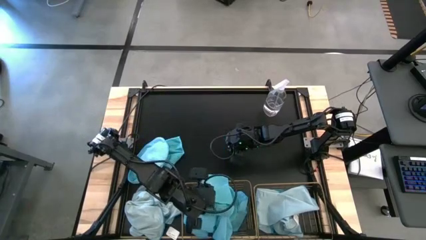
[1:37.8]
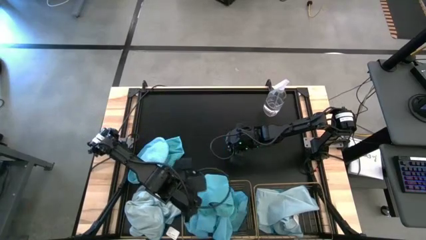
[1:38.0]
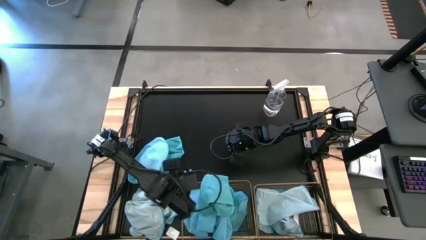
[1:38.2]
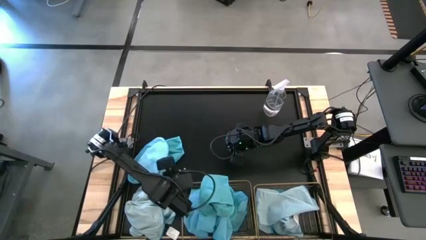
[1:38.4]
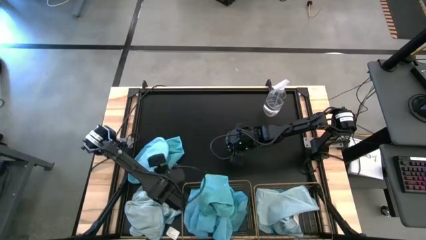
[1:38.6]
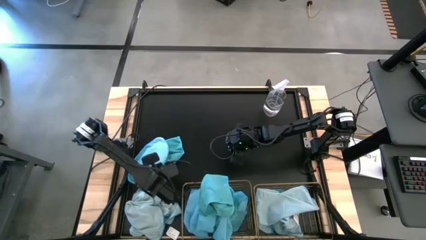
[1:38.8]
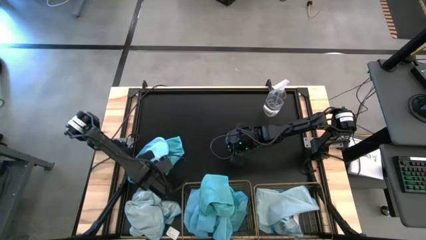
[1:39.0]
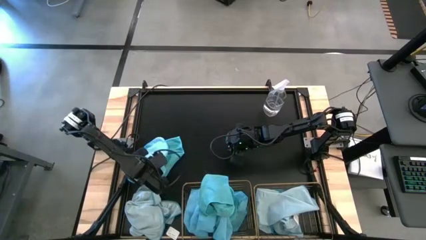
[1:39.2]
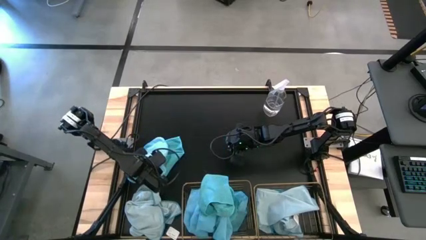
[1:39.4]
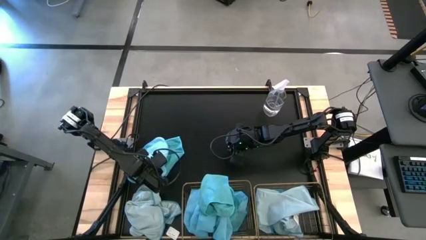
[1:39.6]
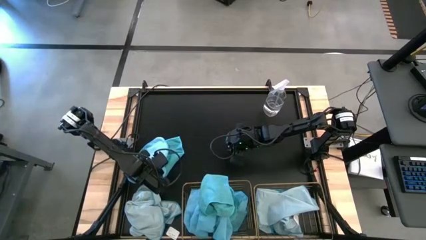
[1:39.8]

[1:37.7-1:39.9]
Task: Sort microfiber towel by color & place in baskets
Put the blue towel into the left wire basket

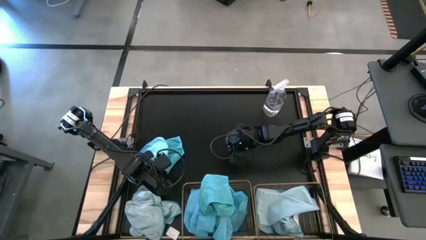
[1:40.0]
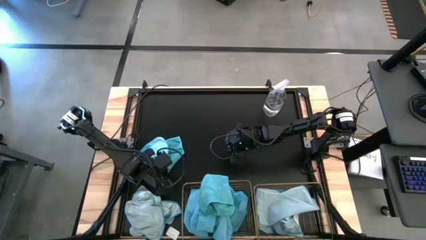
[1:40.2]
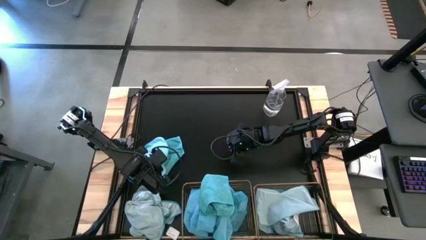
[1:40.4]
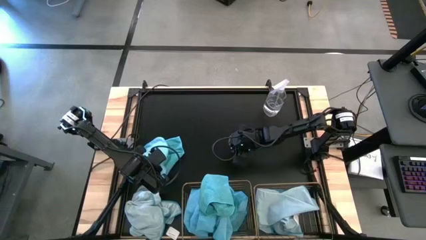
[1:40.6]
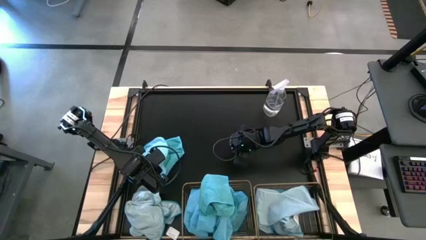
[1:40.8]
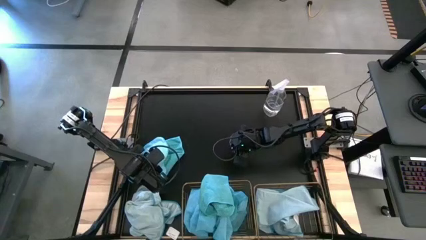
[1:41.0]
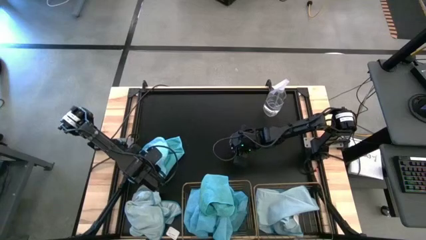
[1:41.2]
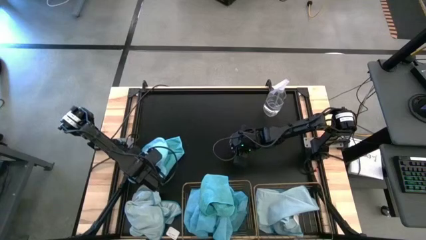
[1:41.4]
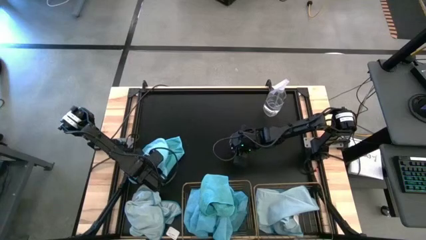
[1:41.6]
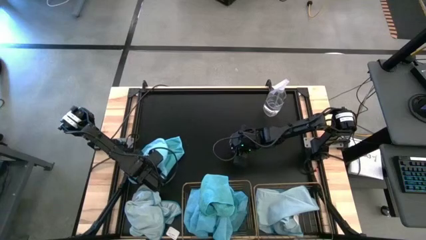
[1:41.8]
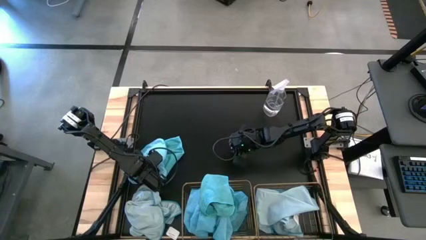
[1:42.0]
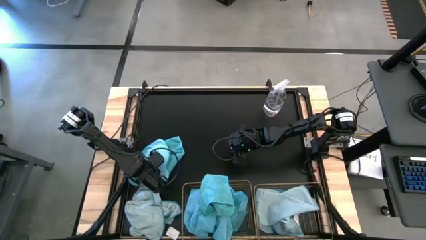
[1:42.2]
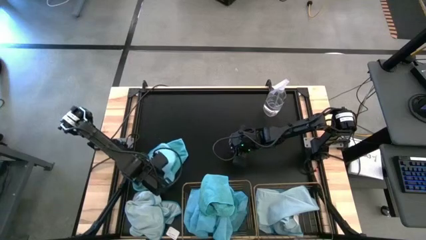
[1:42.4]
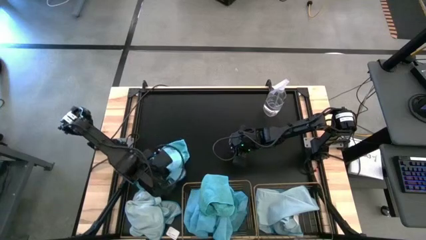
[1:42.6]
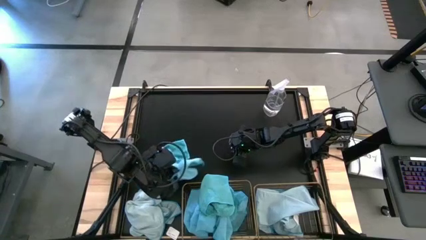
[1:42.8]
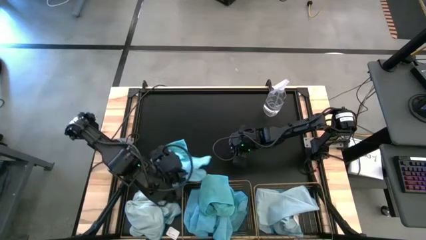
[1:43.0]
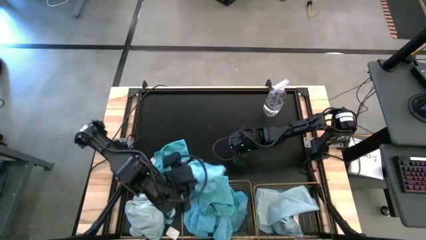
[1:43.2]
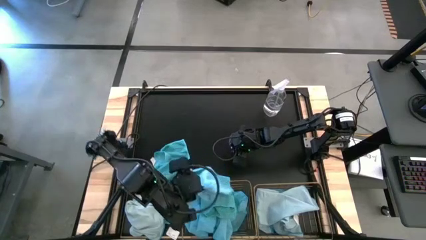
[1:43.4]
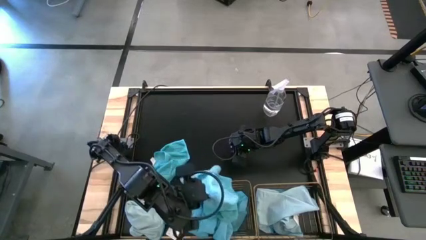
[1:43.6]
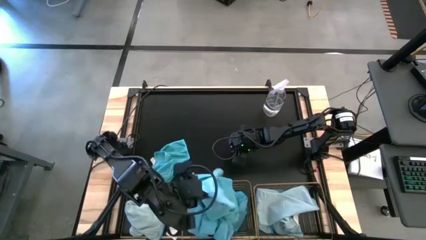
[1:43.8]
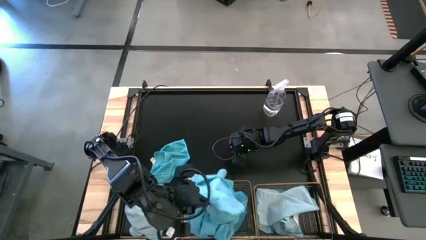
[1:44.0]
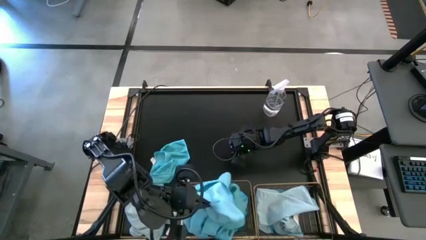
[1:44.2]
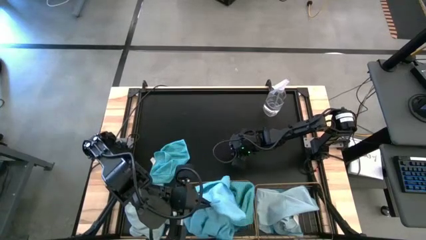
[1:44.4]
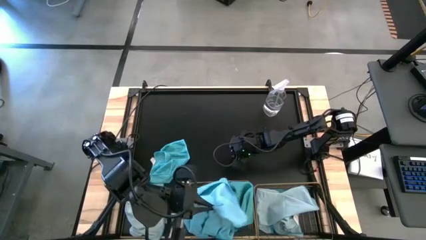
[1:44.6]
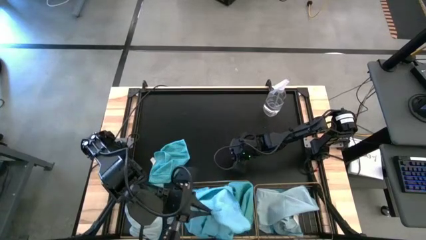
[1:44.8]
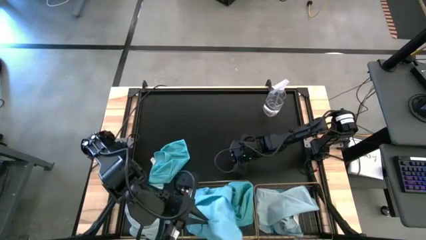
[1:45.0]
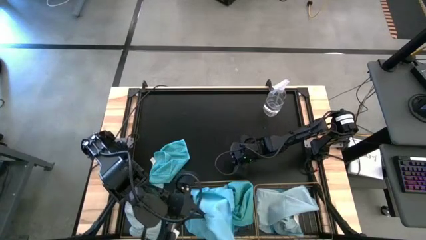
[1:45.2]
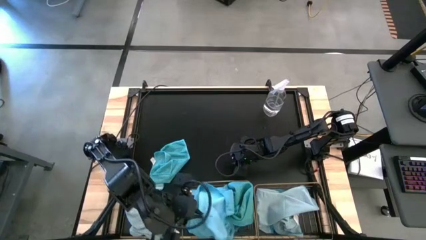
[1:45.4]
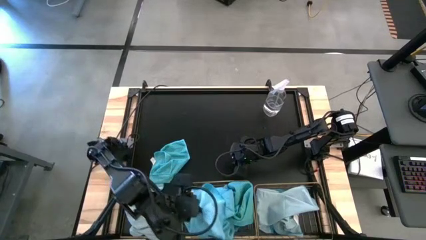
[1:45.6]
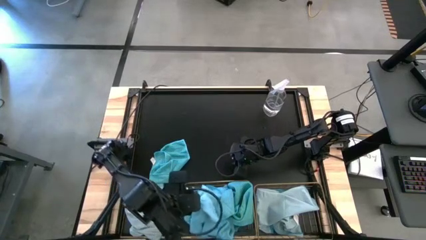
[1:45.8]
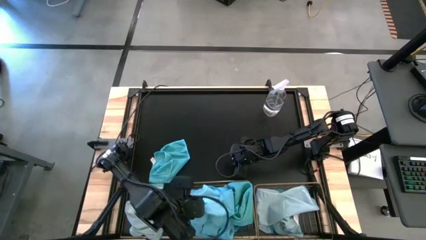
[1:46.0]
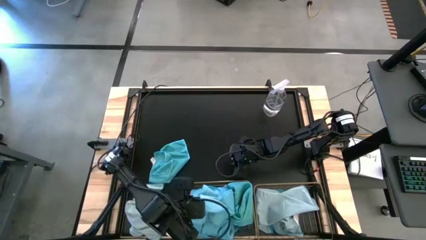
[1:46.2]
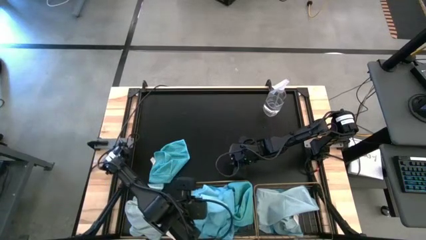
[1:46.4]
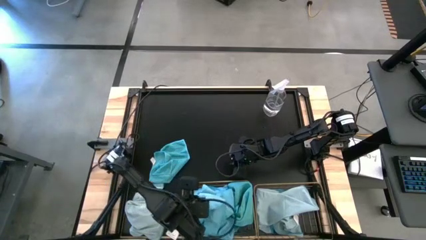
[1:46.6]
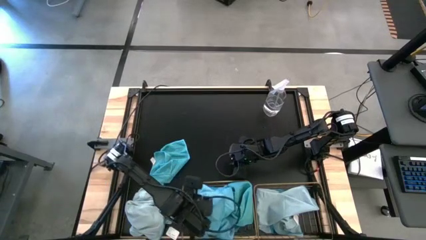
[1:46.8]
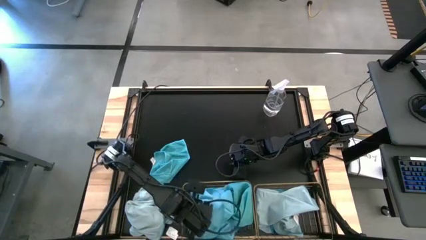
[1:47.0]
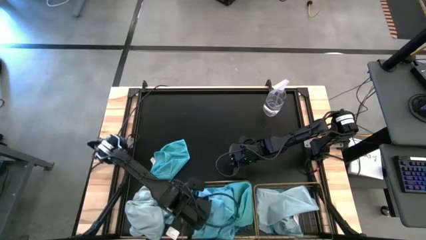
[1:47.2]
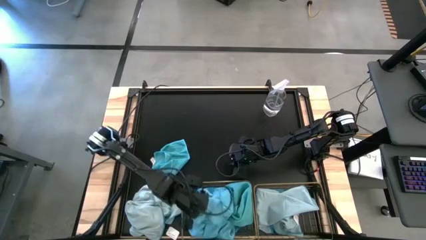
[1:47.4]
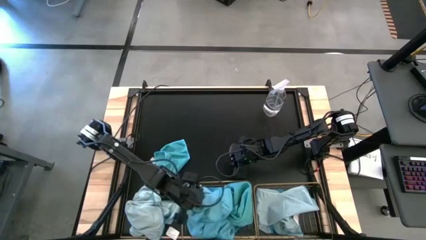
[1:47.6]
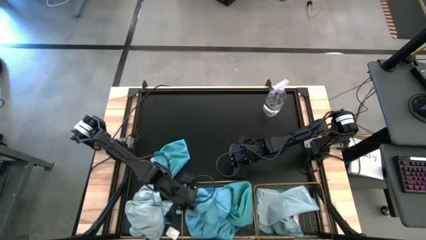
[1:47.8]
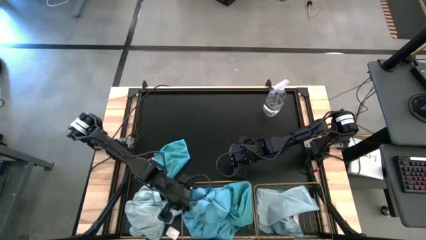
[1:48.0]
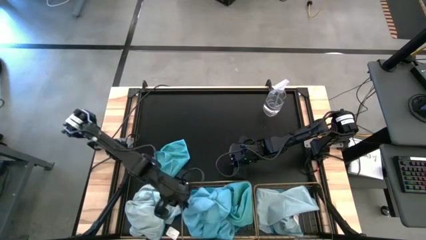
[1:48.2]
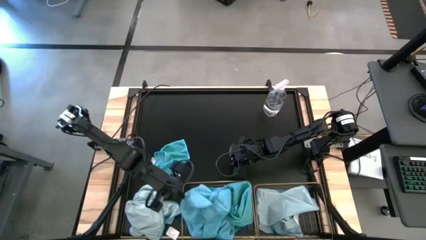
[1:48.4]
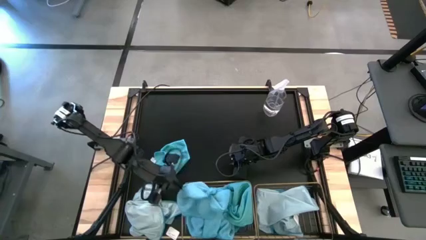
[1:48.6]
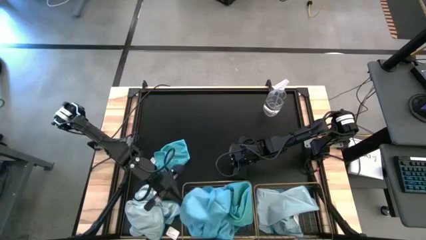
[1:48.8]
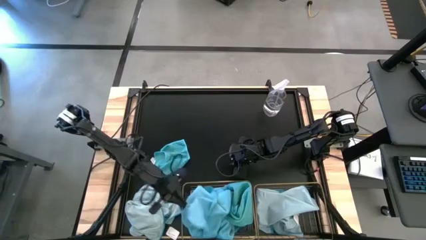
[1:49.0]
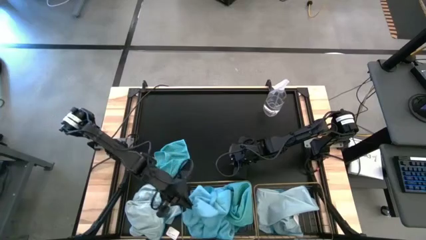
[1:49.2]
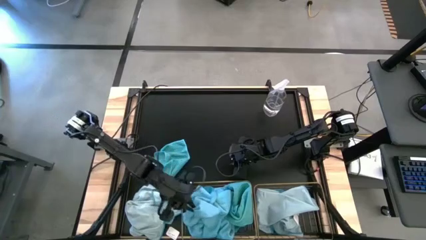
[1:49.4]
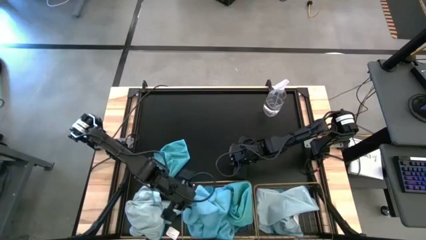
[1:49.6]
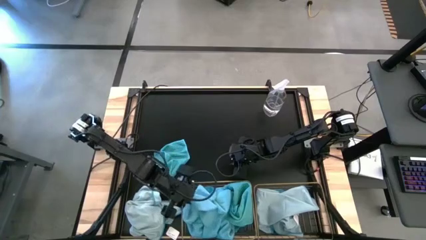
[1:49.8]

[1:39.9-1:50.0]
Put the blue towel into the left wire basket
